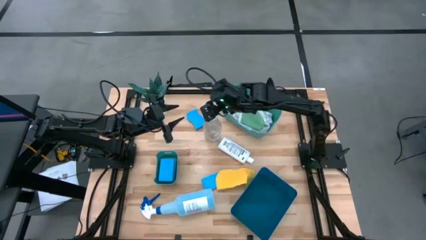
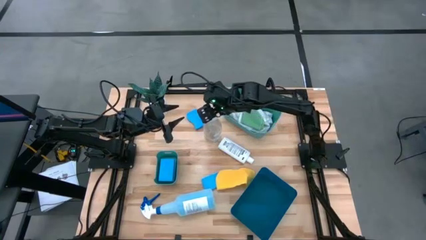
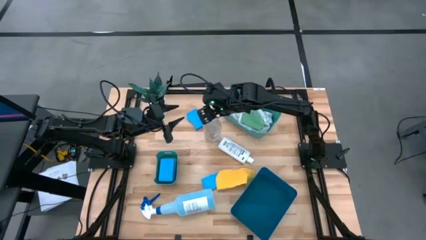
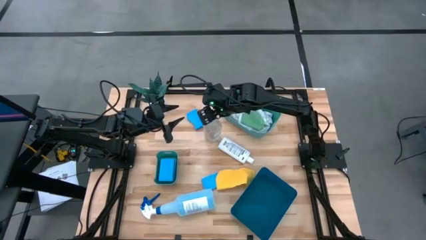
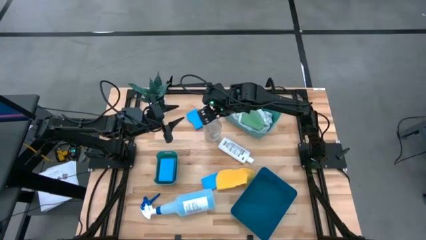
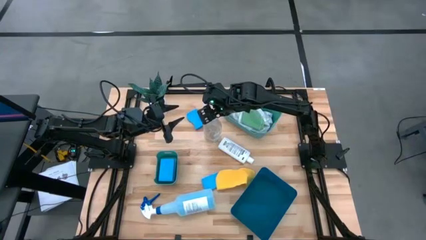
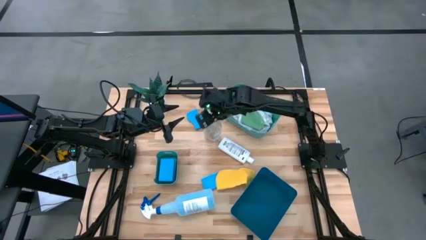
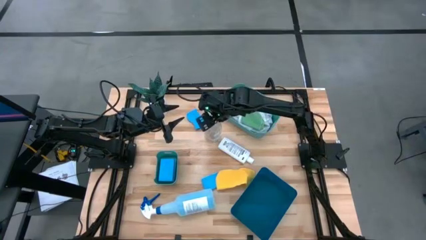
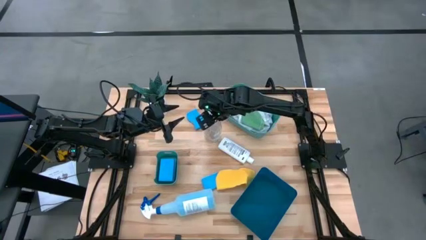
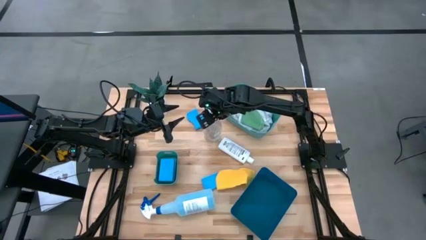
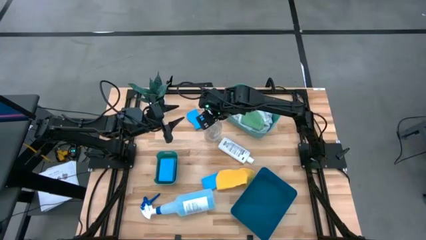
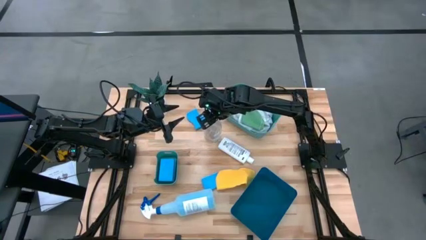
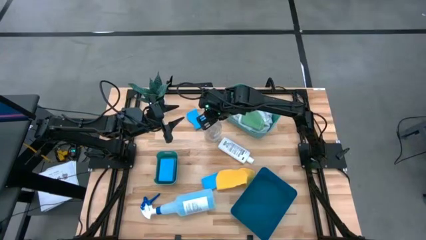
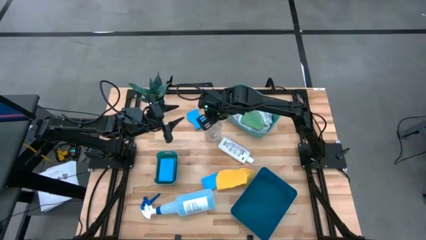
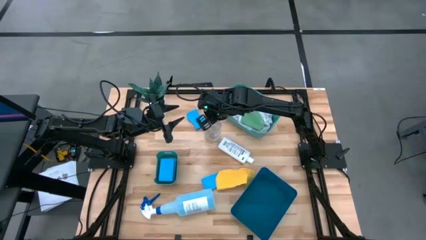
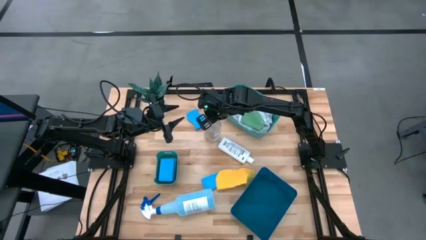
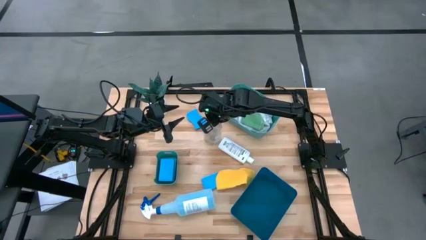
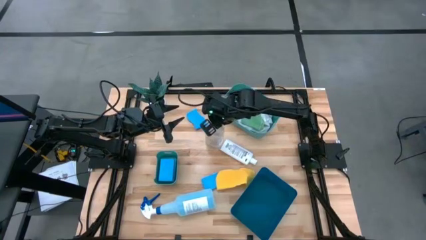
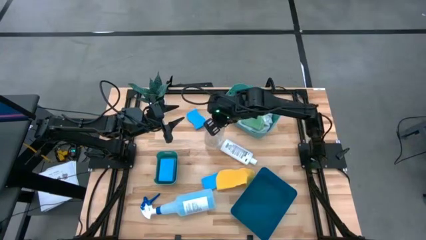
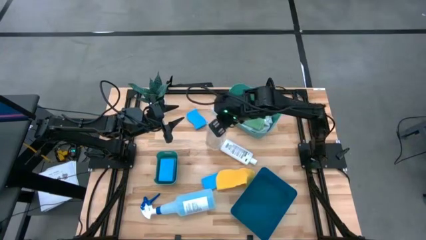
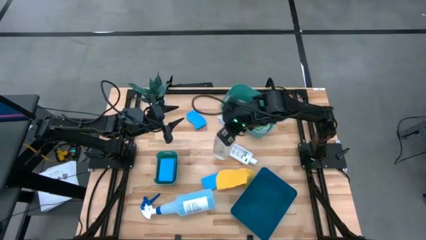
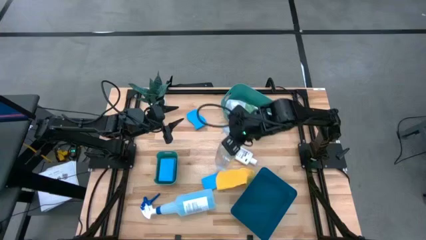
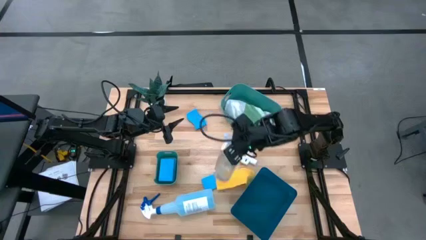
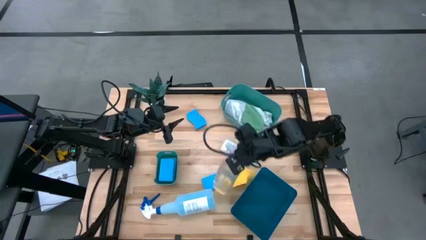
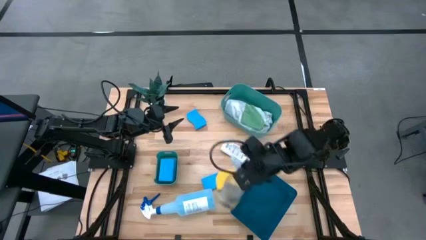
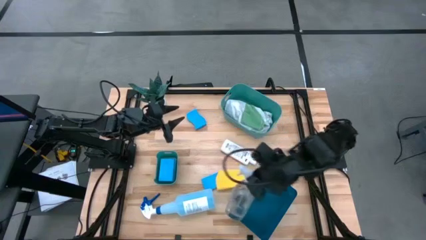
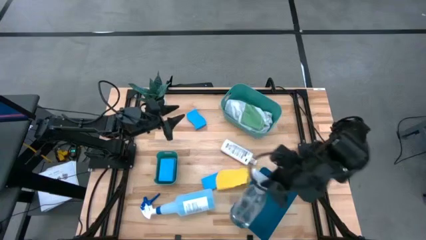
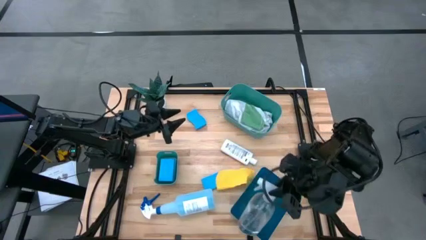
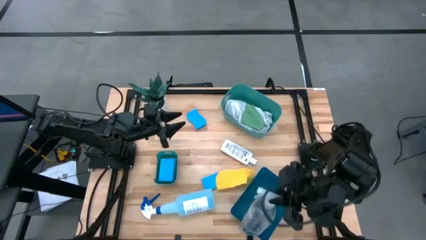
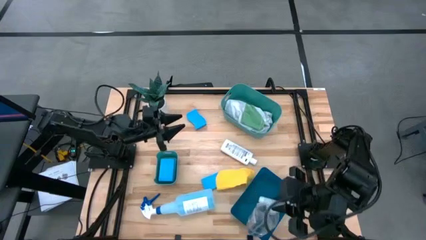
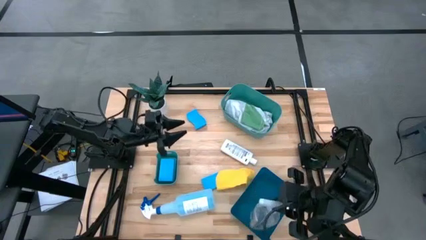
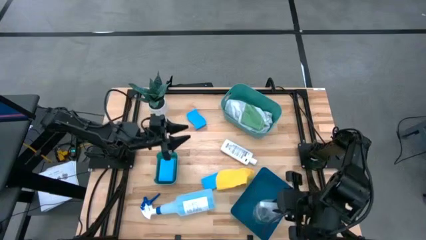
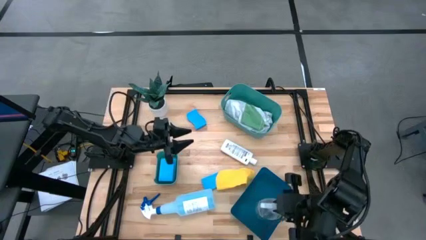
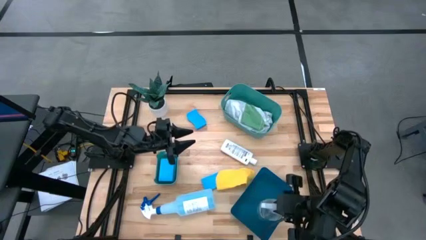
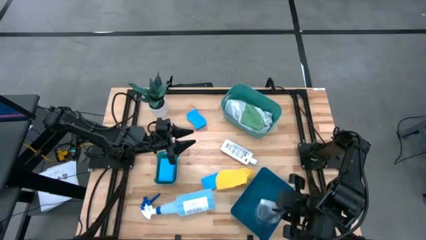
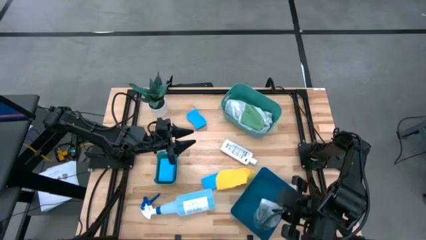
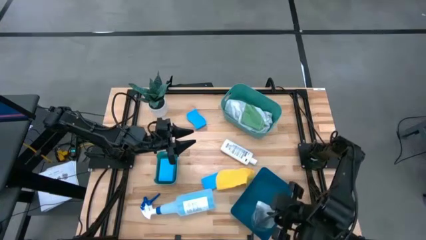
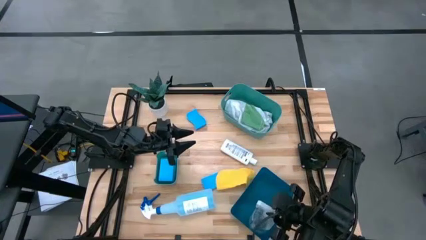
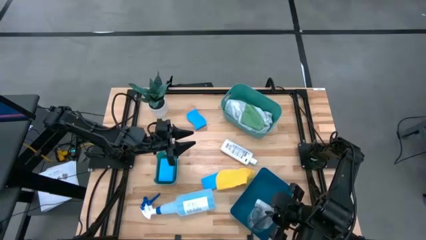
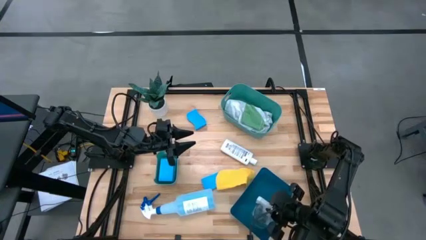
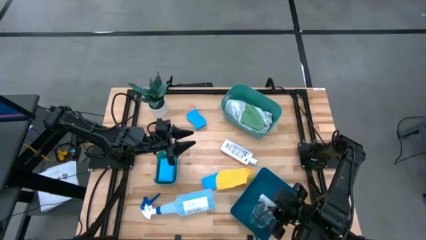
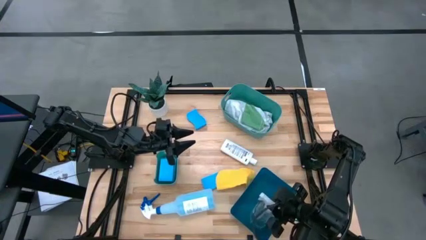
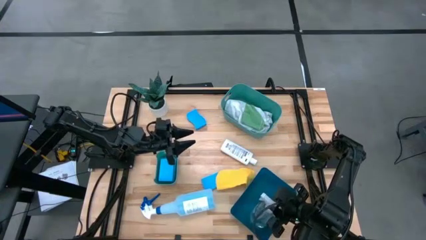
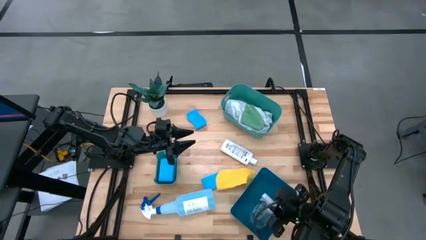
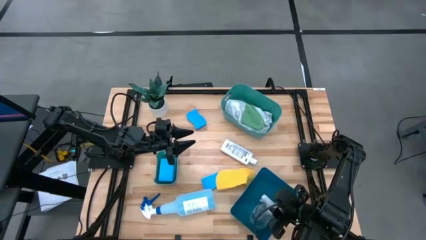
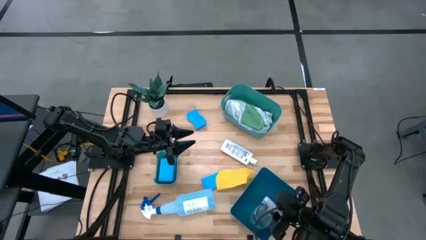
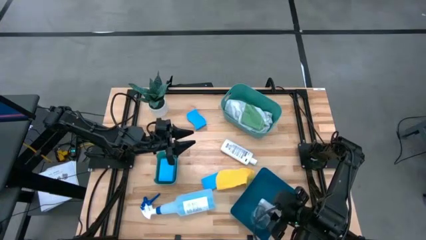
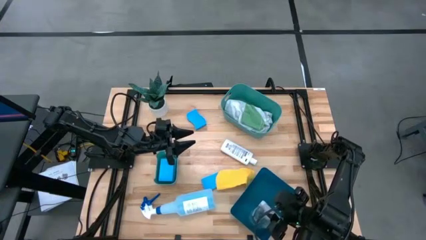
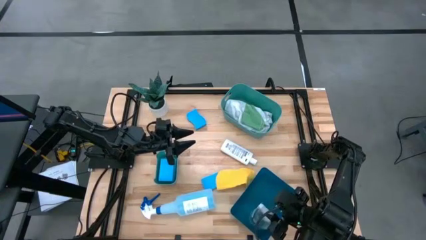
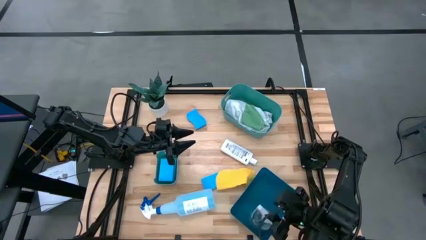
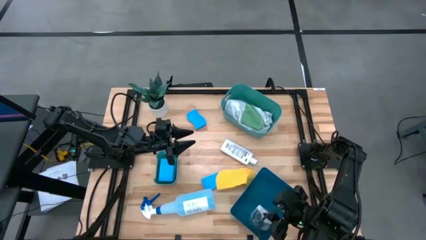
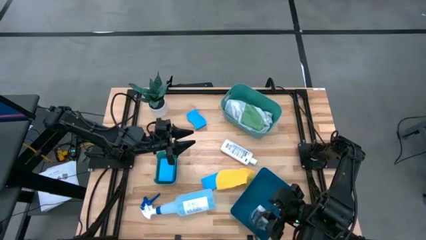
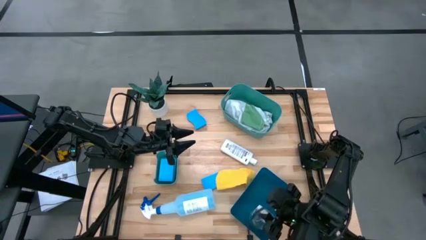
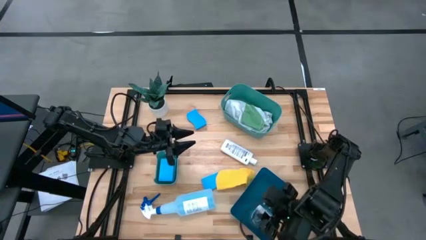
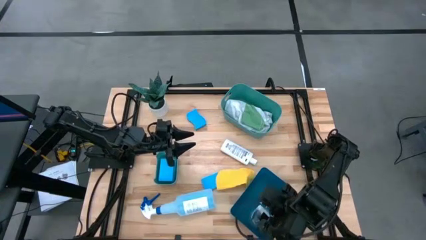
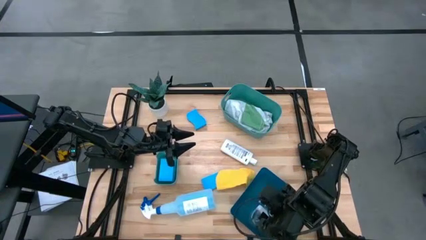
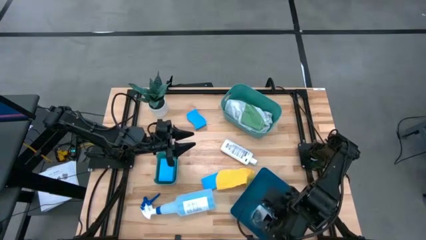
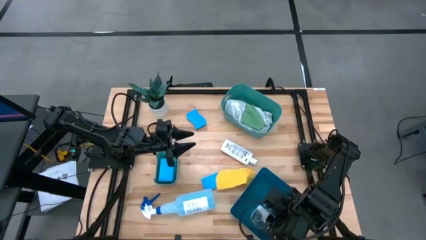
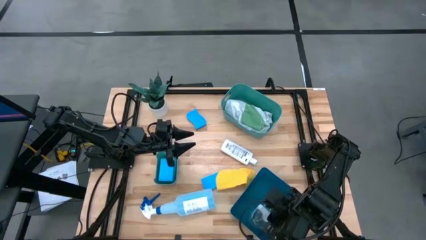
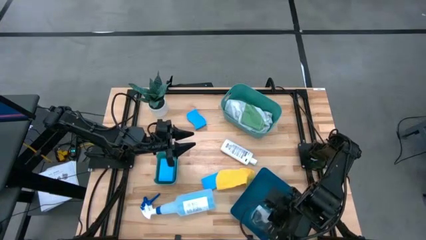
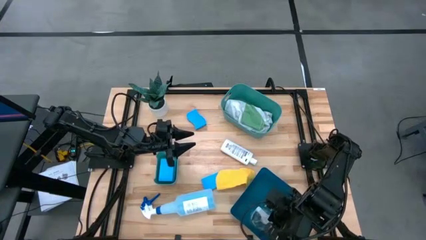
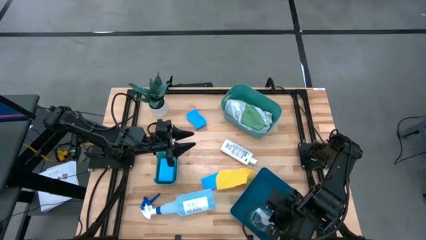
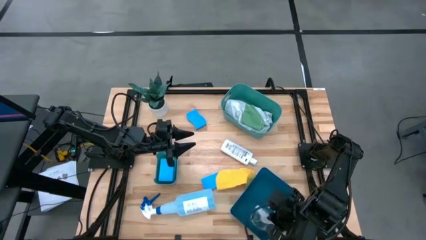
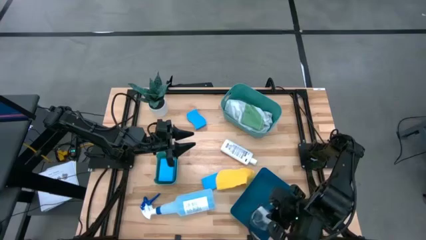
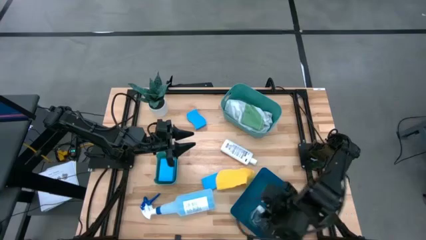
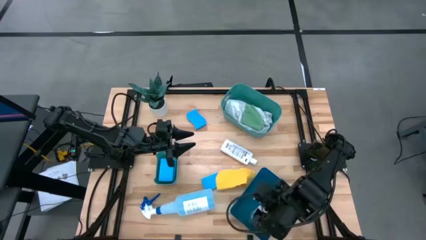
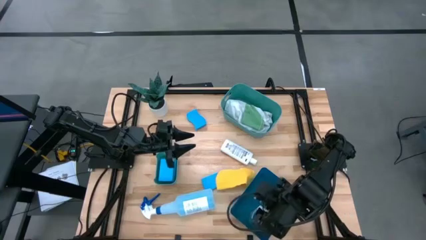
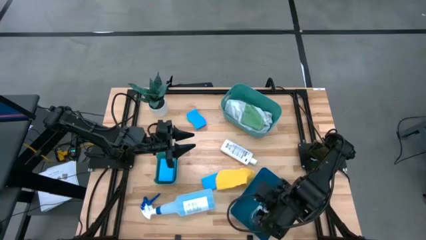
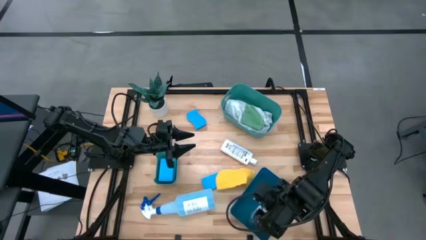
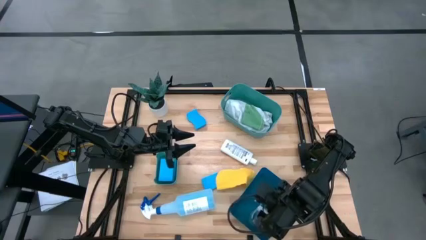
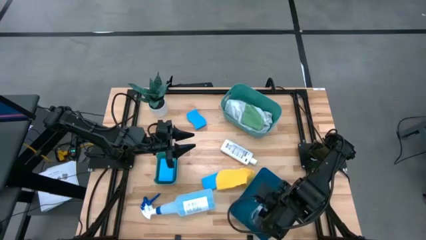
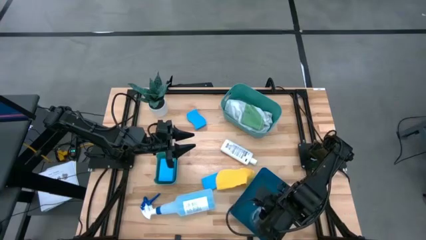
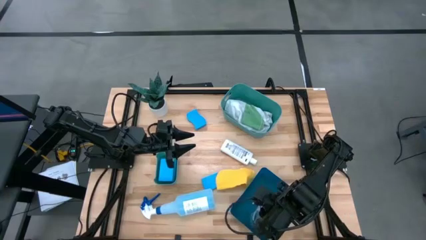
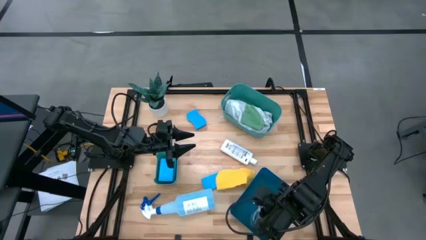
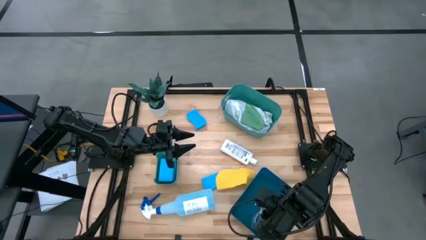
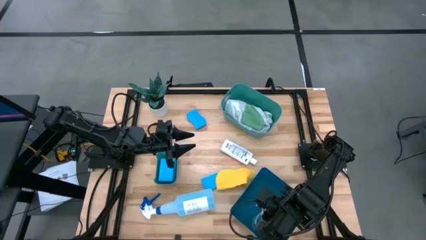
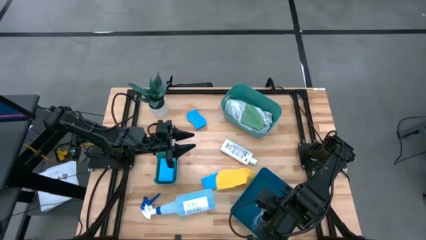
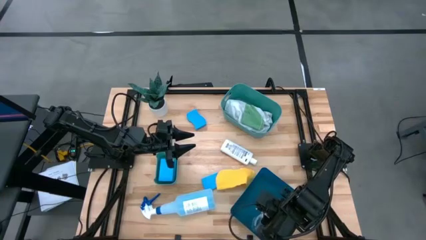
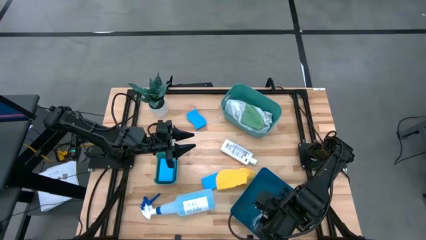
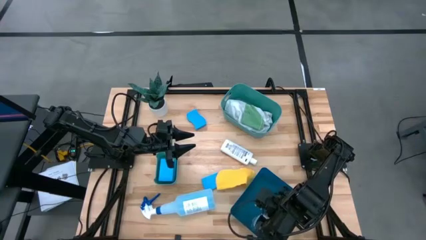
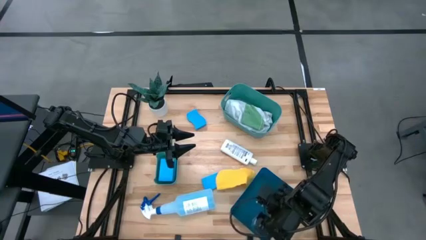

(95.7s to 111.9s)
Task: Pick & Place Kitchen Items
Put the transparent spray bottle into the blue bin
